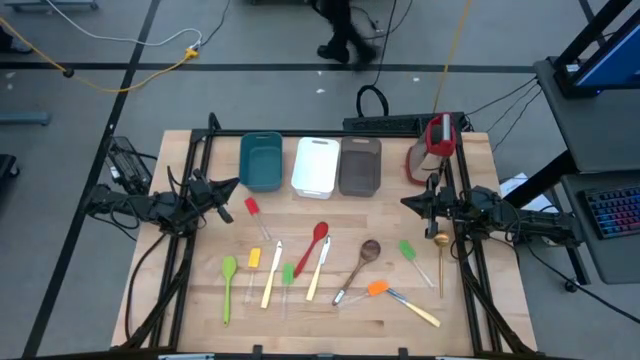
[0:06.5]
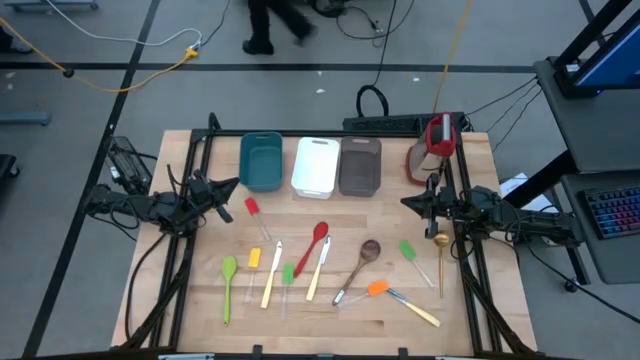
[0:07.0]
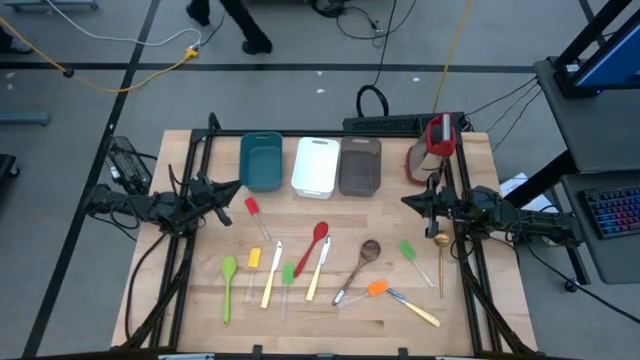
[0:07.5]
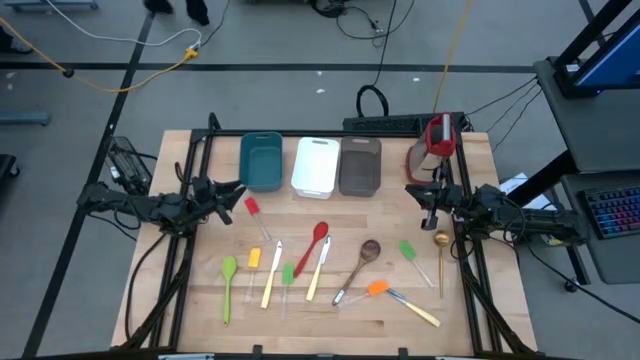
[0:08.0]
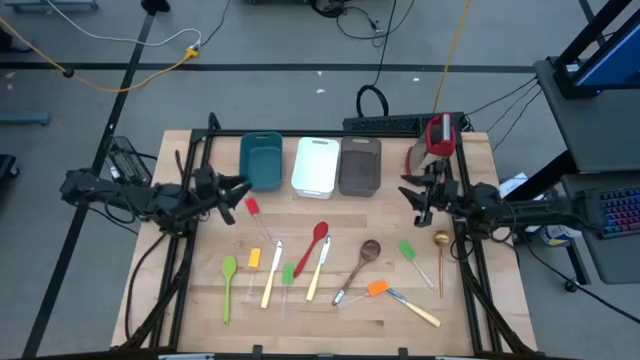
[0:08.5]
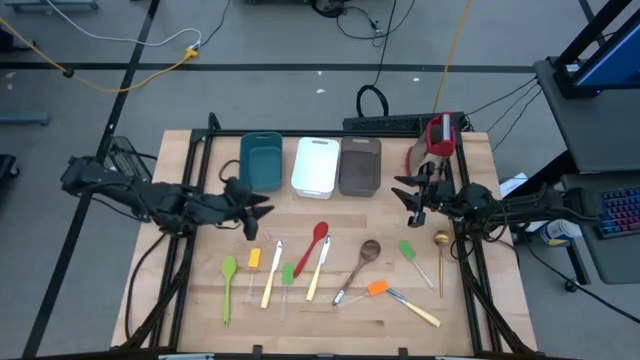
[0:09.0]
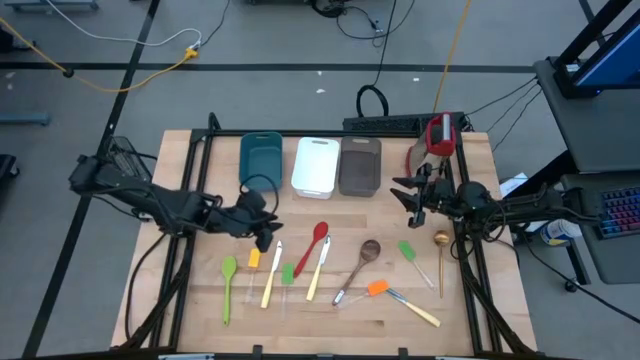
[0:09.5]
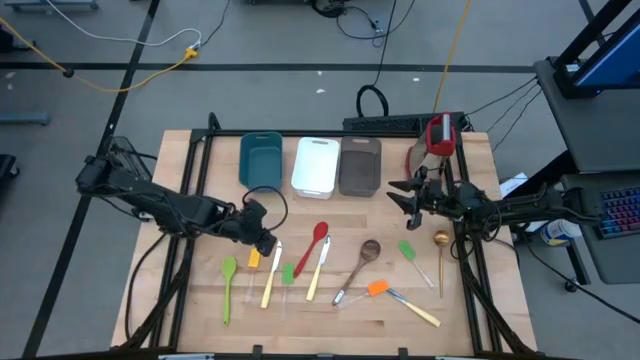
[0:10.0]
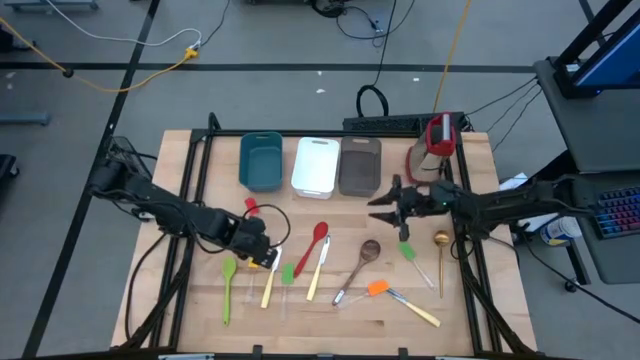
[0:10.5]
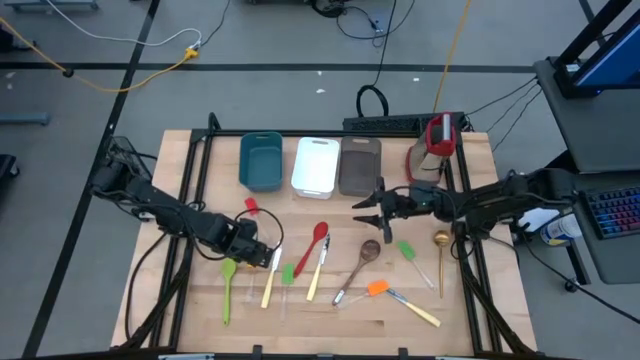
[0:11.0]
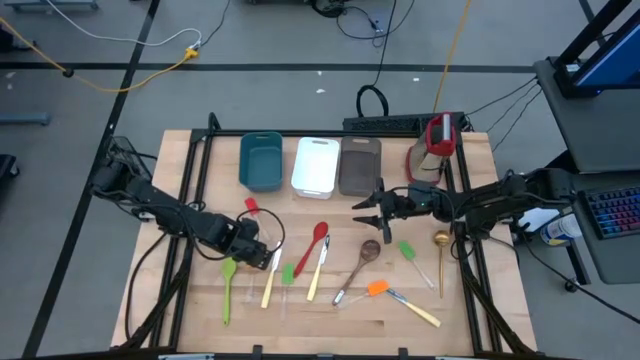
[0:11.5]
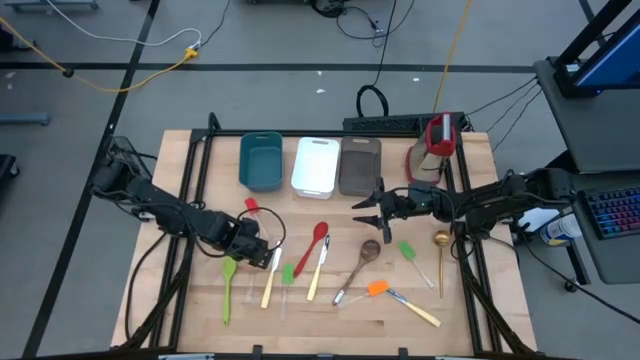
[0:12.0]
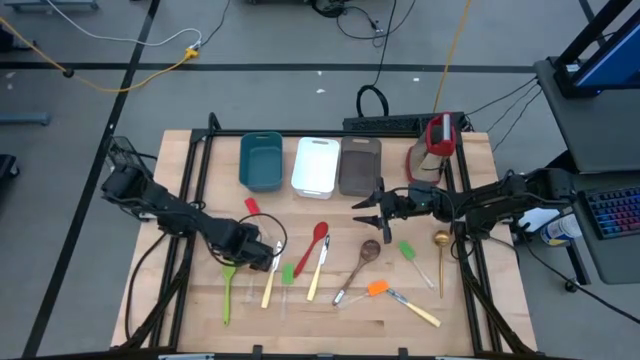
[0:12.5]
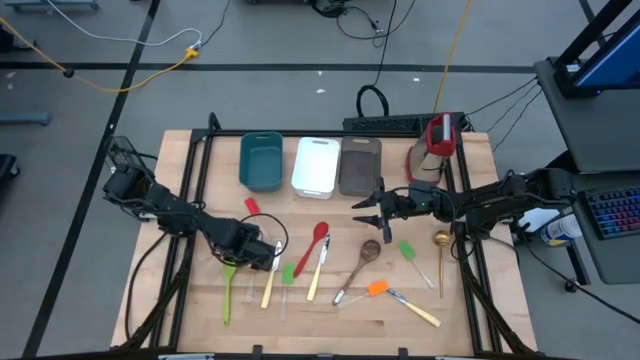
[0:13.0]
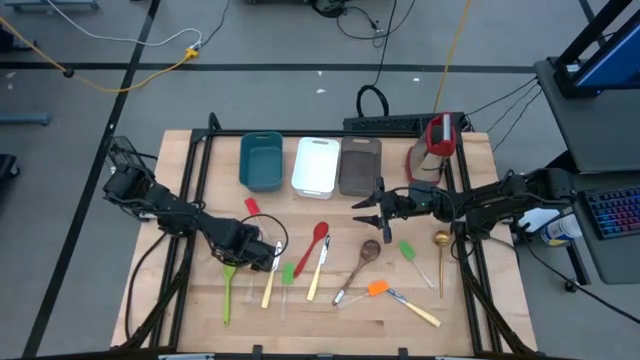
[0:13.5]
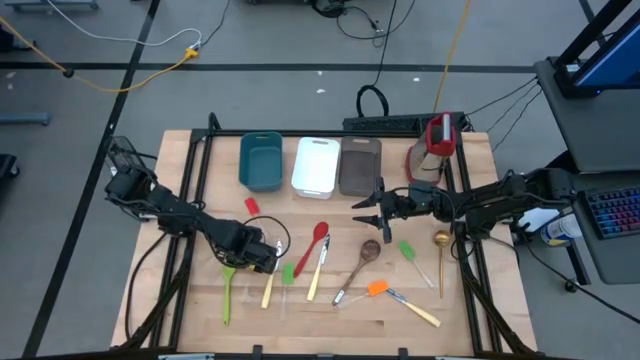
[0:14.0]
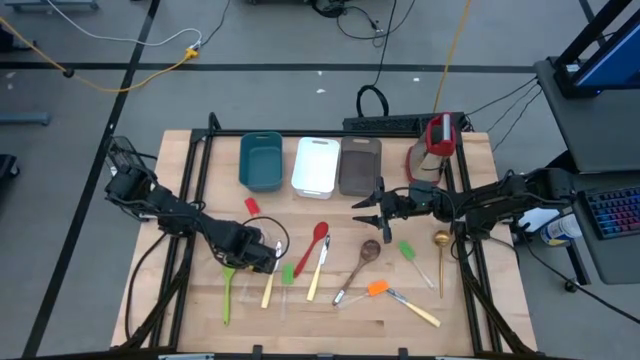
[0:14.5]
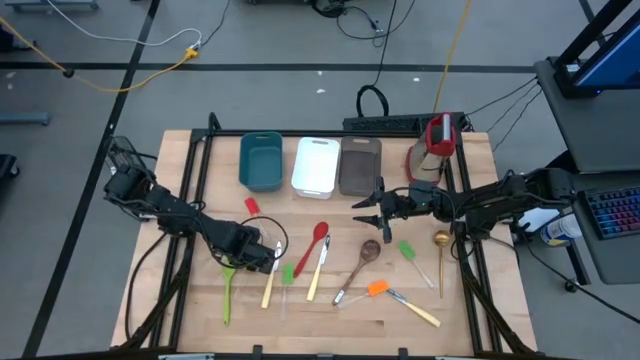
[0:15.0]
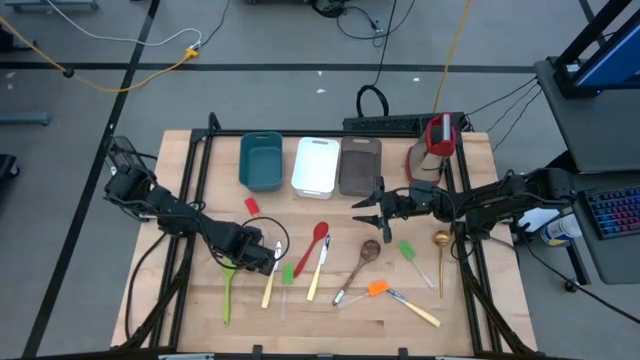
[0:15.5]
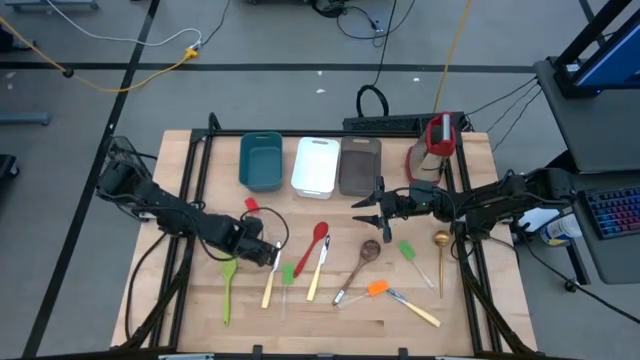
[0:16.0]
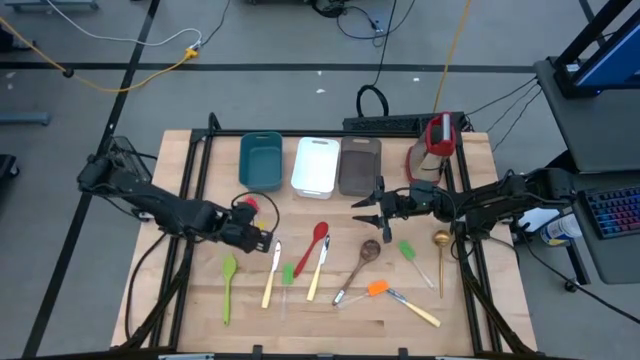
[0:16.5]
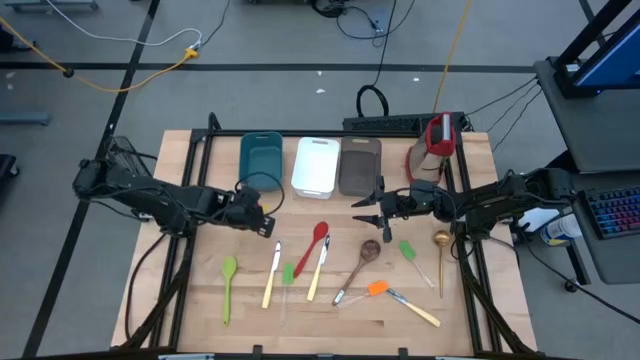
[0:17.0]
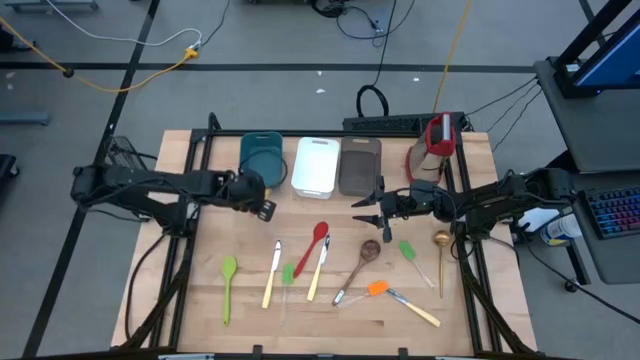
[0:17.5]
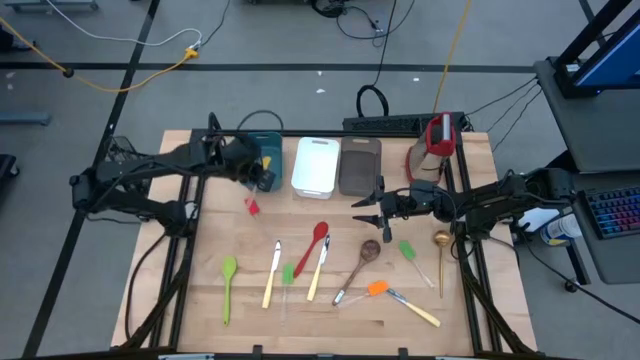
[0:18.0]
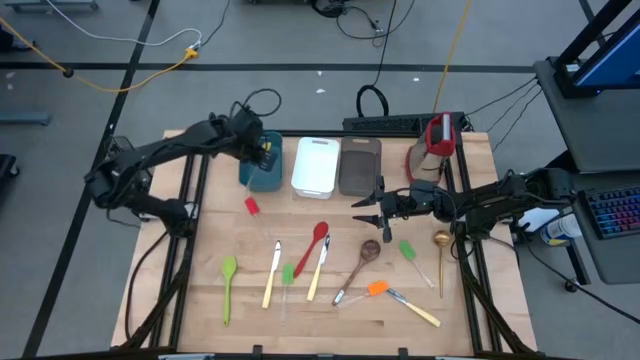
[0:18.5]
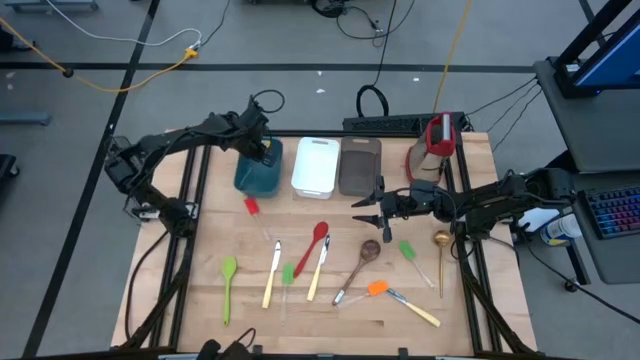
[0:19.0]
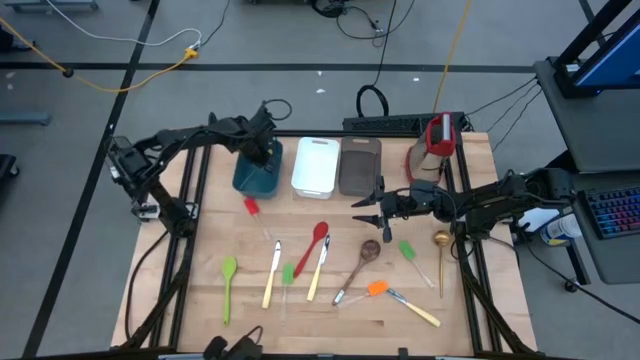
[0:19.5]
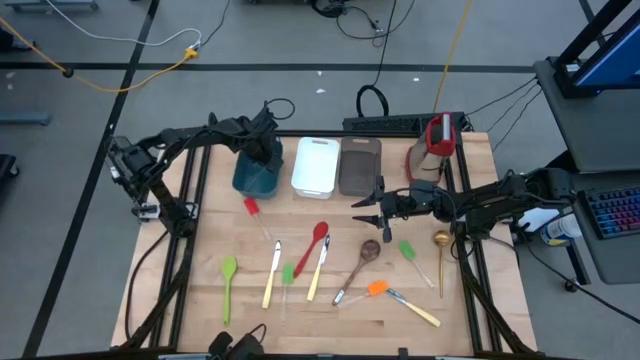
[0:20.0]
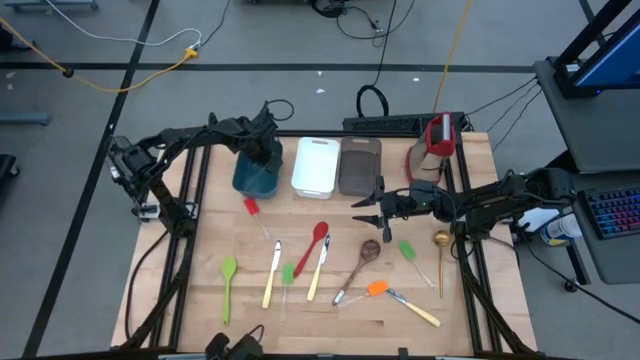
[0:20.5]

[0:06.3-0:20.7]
Task: Pick & Place Kitchen Items
Put the yellow spatula into the blue bin
